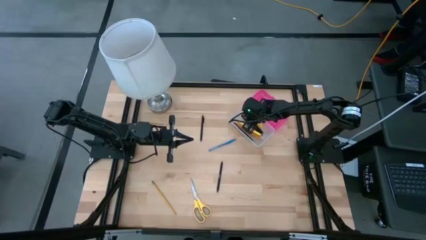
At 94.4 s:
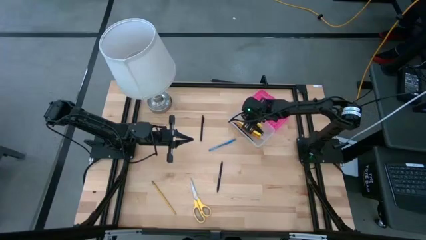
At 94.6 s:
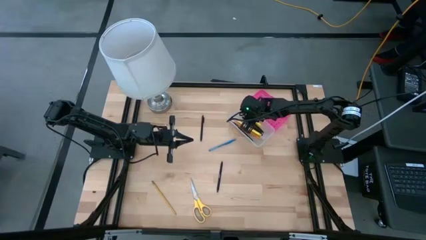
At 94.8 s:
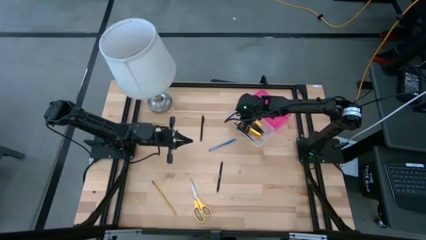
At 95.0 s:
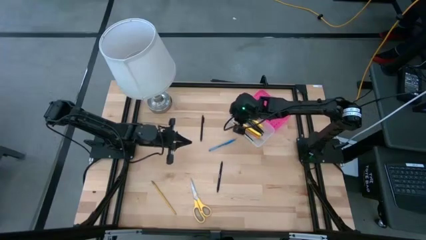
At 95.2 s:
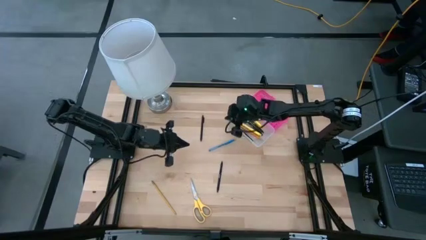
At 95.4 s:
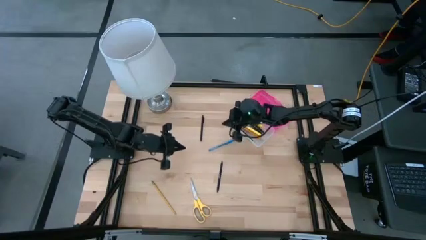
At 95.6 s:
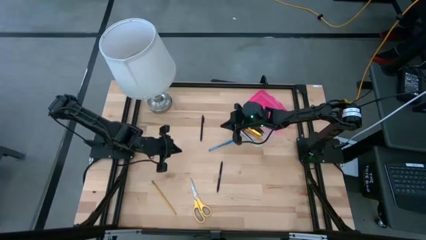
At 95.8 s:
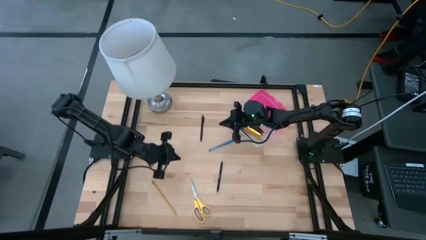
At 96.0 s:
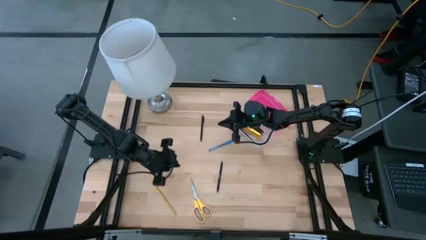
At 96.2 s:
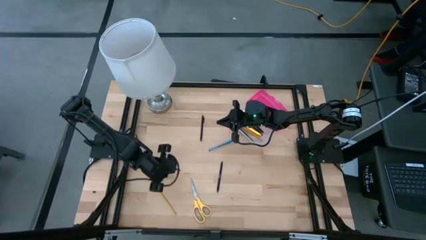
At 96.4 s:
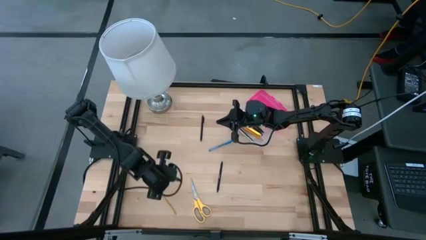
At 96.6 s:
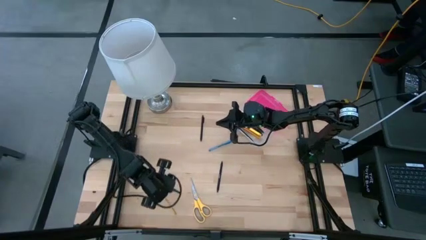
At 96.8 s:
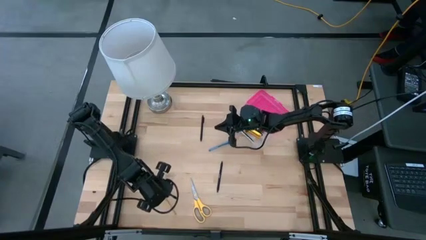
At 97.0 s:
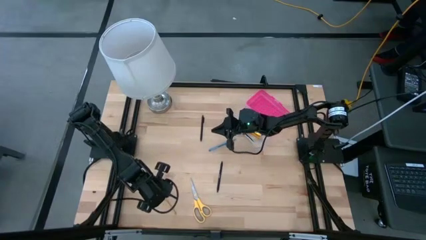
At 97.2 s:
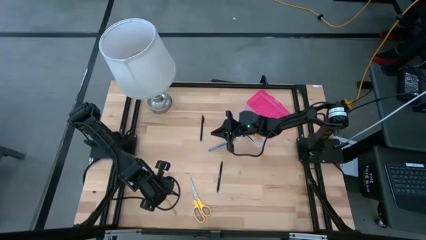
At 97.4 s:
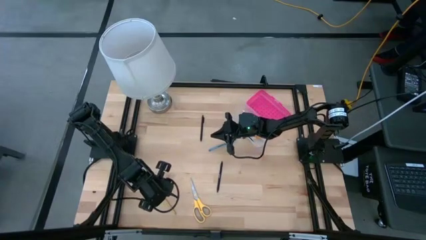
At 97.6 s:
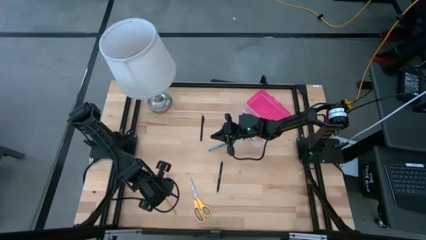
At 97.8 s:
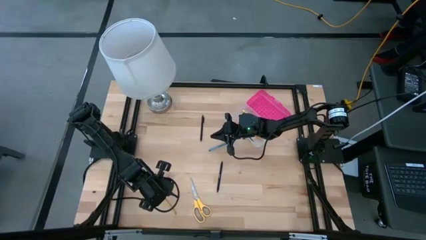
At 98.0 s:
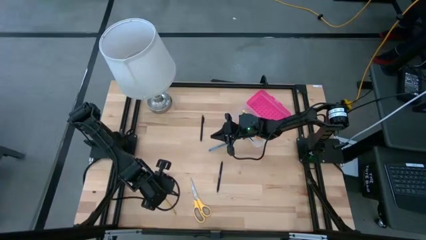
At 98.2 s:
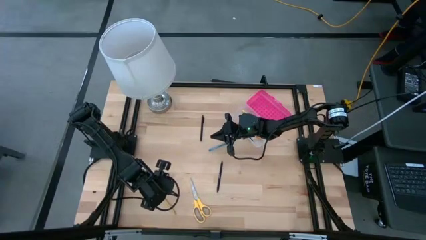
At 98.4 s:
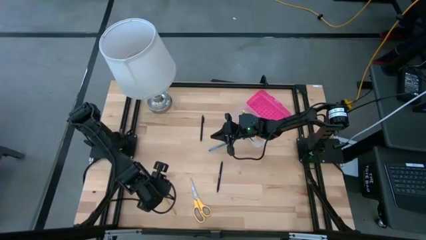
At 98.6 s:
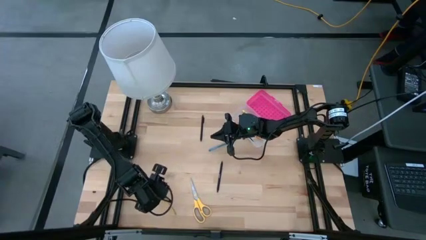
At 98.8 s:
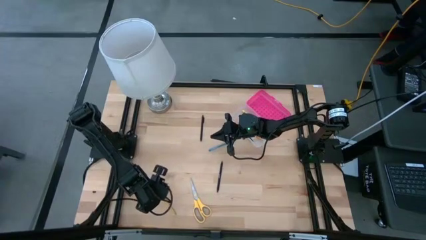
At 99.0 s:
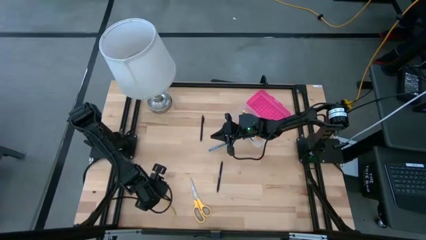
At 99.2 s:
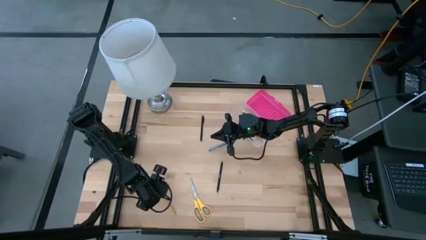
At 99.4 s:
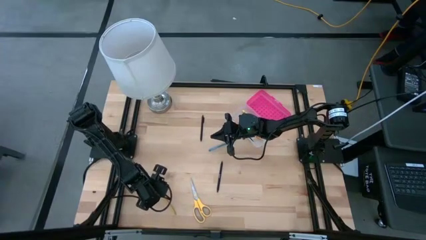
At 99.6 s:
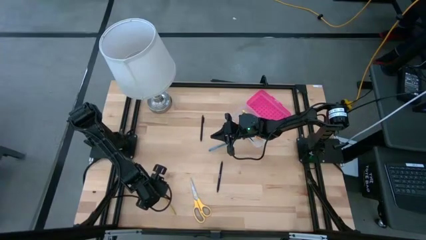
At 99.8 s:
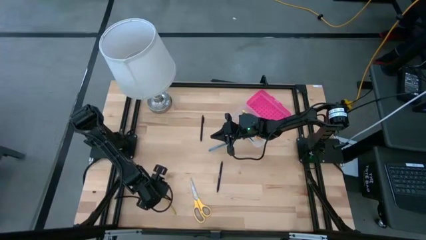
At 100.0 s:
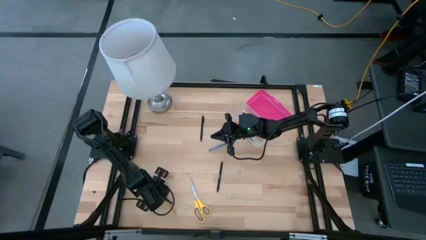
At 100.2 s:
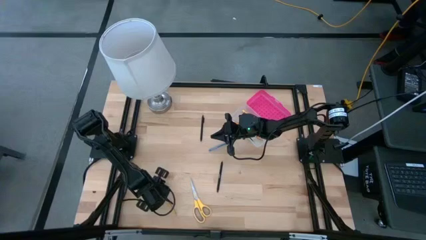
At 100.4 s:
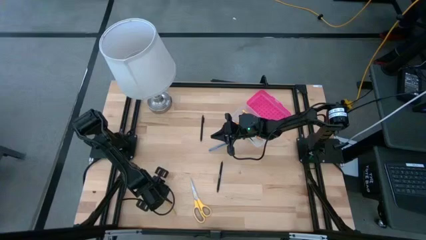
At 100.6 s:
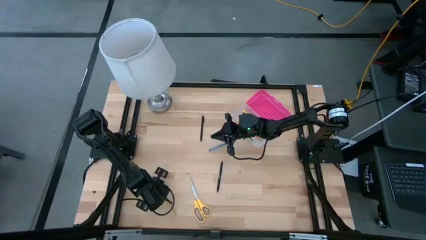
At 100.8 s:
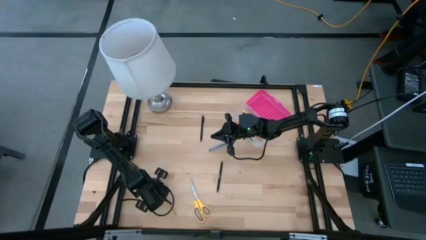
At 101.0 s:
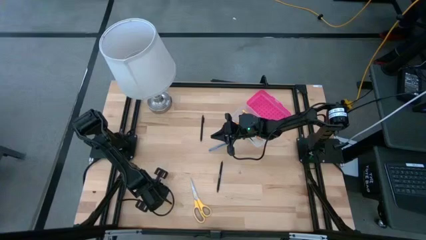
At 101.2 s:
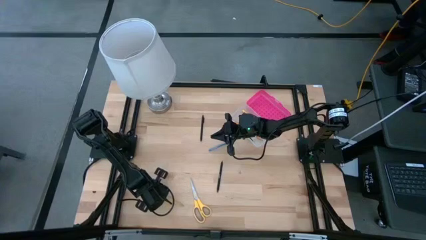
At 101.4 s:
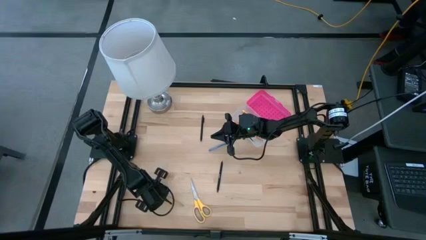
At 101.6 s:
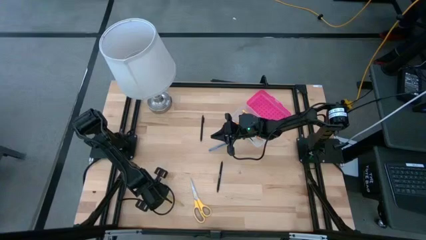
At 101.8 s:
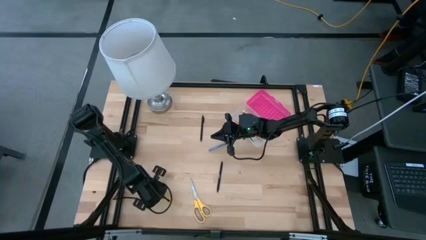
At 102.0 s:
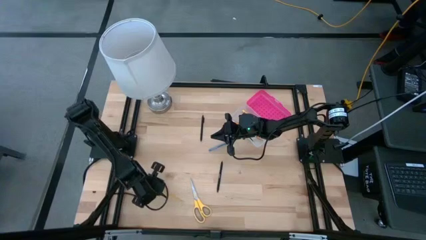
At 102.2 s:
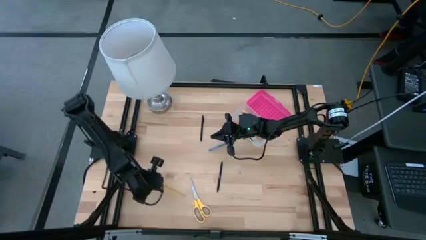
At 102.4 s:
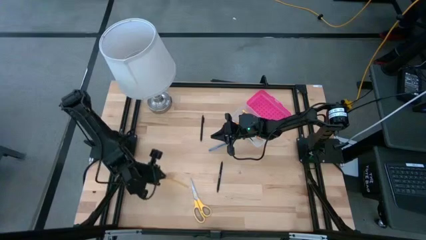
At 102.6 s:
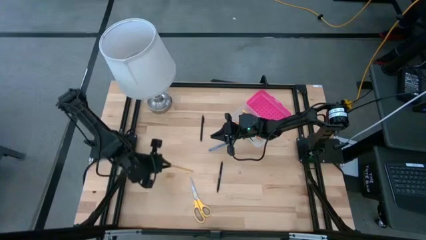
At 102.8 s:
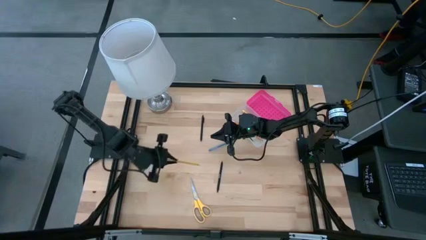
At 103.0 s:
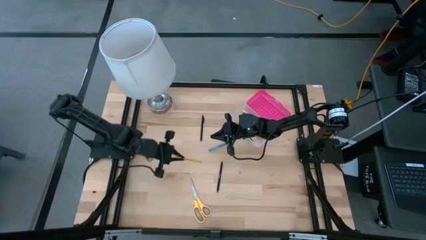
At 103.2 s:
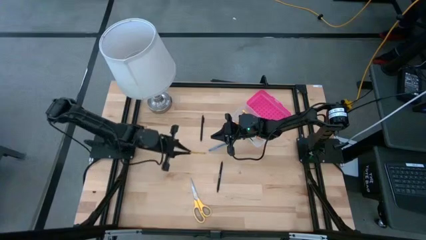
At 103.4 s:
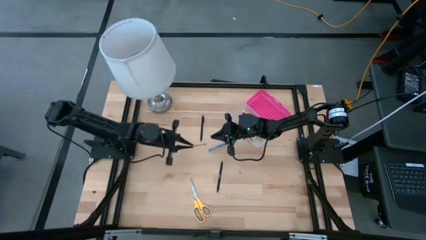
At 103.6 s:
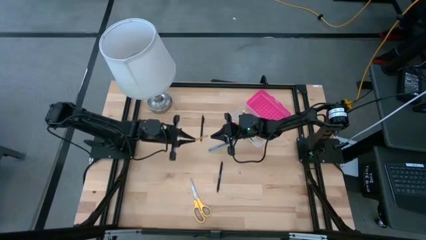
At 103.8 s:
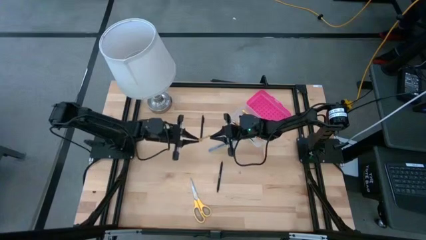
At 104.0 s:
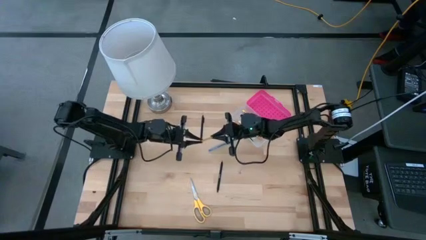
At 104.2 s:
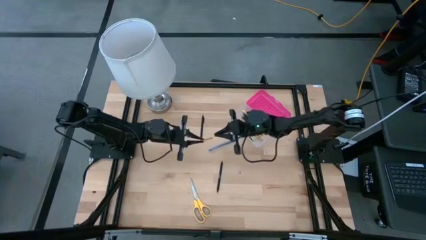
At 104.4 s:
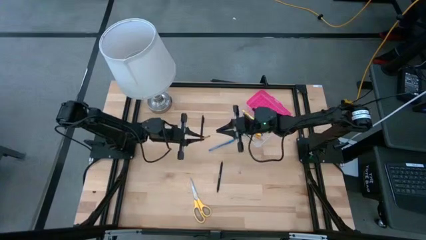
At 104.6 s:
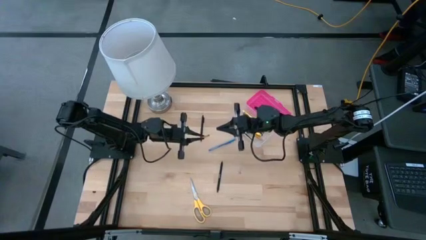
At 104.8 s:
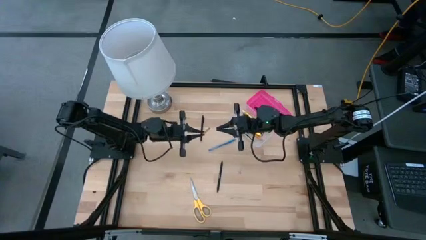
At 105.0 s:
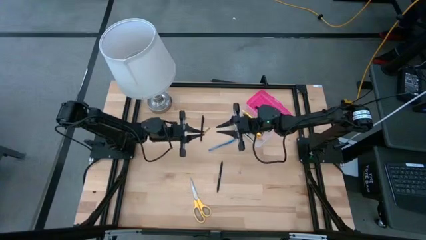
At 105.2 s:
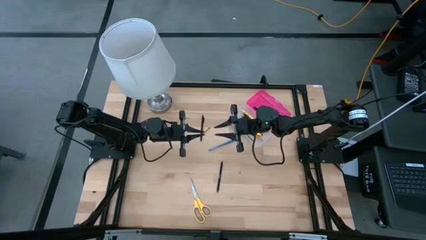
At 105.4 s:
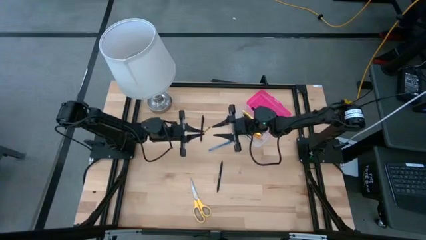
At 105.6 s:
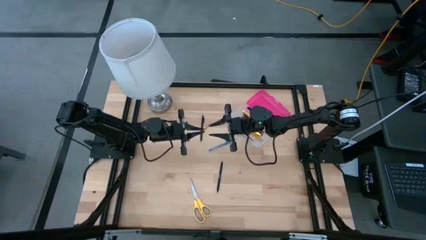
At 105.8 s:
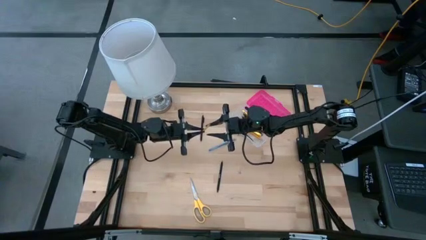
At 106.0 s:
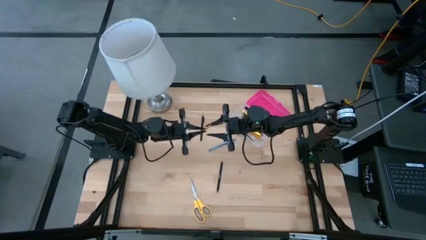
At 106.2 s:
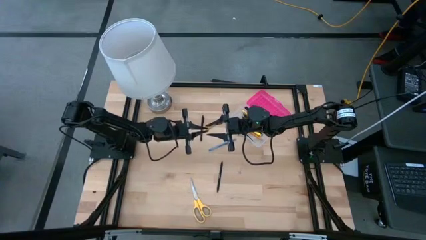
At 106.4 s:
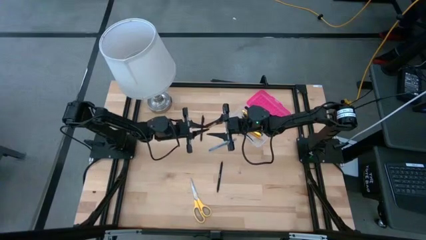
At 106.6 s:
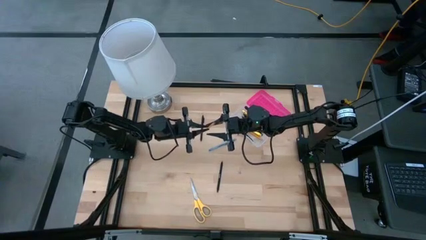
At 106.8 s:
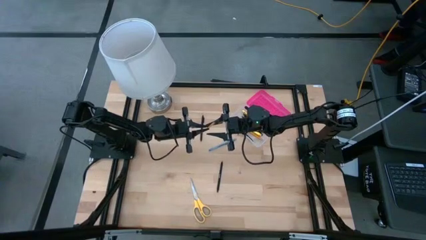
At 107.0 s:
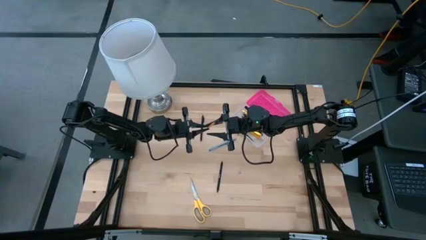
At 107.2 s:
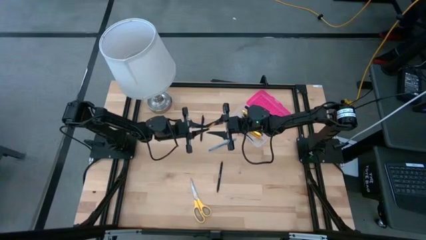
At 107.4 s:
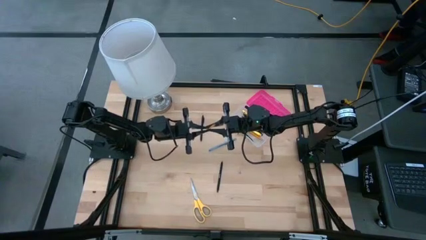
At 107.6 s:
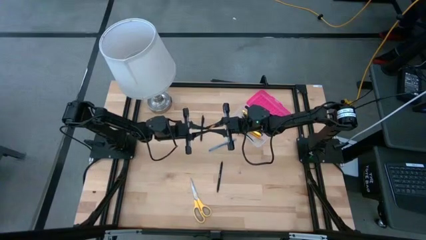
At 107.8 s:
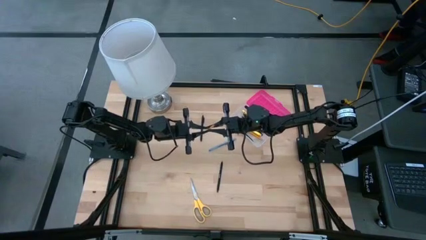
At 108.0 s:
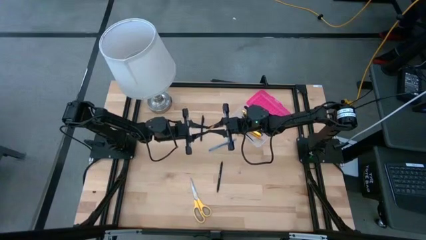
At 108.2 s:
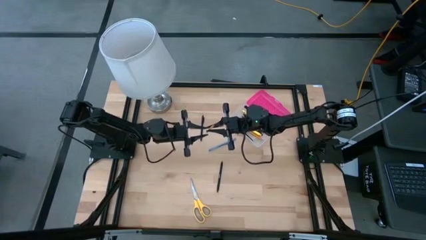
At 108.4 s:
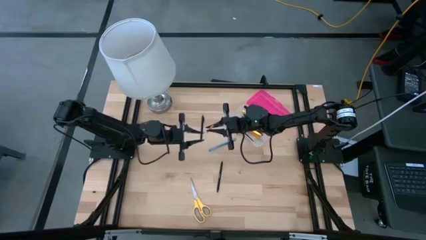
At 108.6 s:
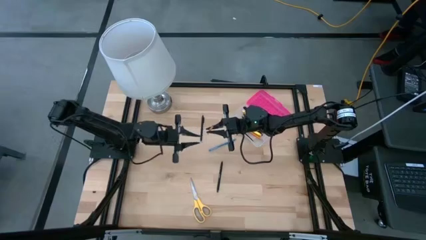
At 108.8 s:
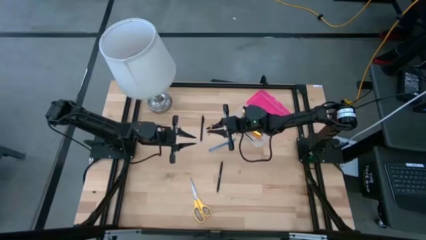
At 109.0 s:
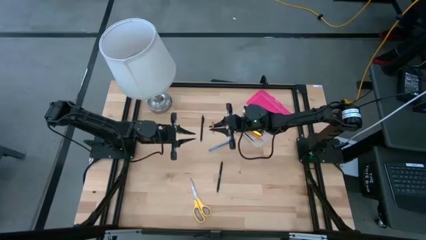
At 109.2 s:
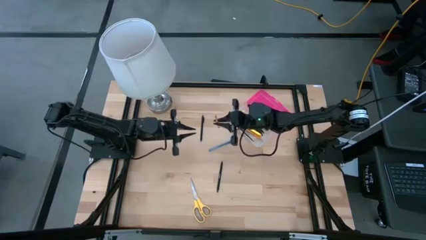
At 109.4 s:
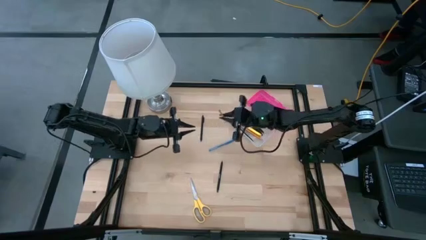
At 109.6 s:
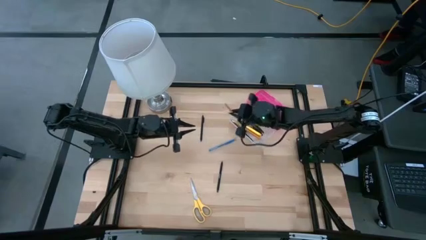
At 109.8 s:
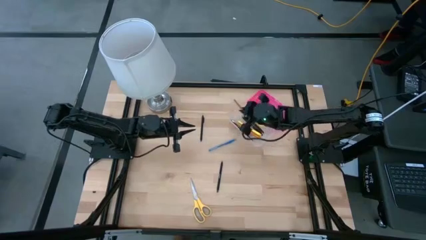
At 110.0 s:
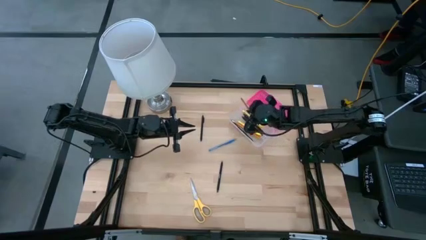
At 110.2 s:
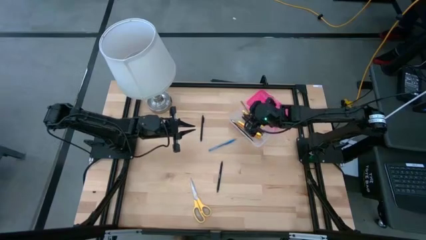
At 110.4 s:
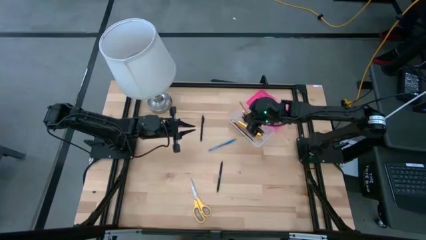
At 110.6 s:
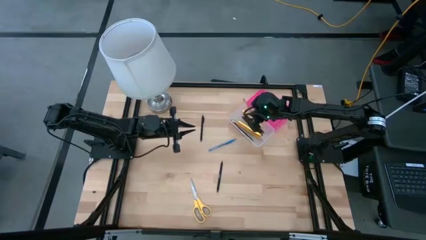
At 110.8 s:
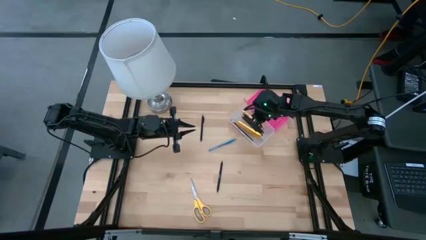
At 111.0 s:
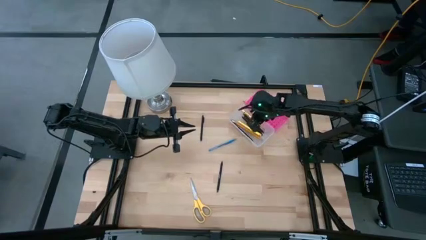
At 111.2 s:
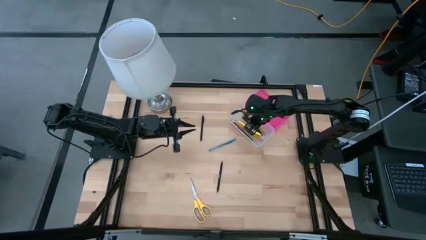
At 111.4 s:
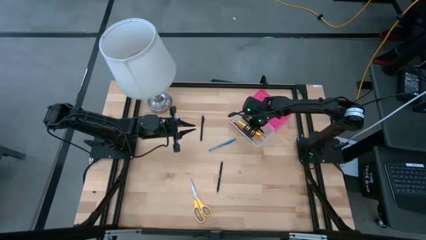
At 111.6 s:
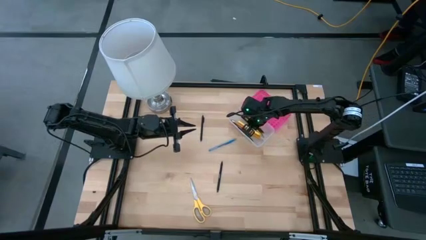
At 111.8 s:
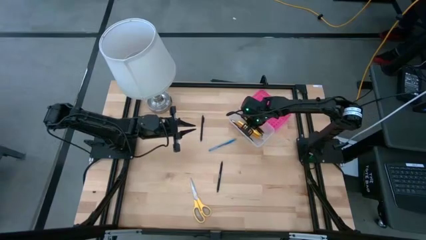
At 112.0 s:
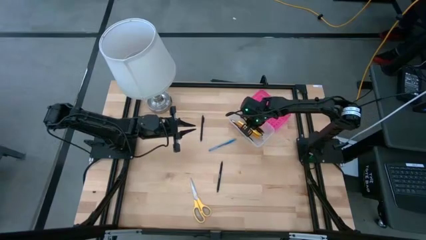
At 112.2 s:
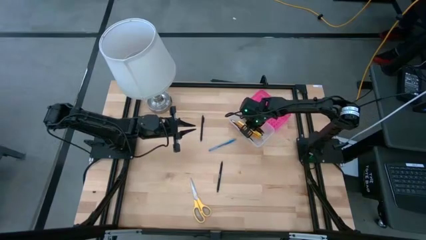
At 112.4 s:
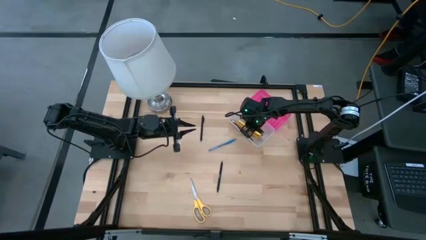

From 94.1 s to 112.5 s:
Task: Pick & place school supplies into a supply box
Put the yellow pencil into the pink supply box
